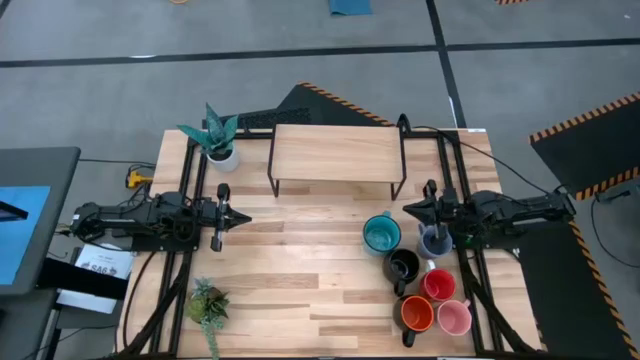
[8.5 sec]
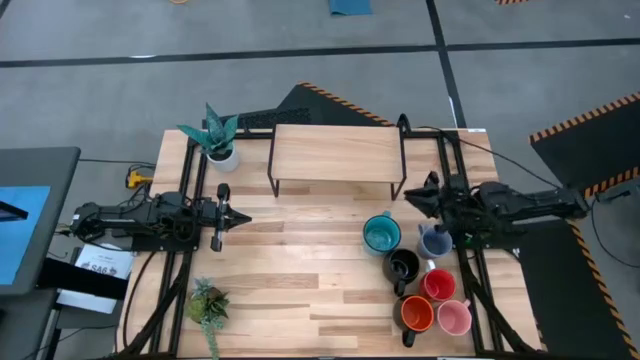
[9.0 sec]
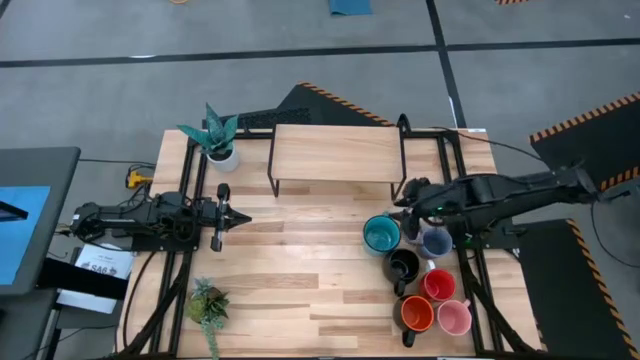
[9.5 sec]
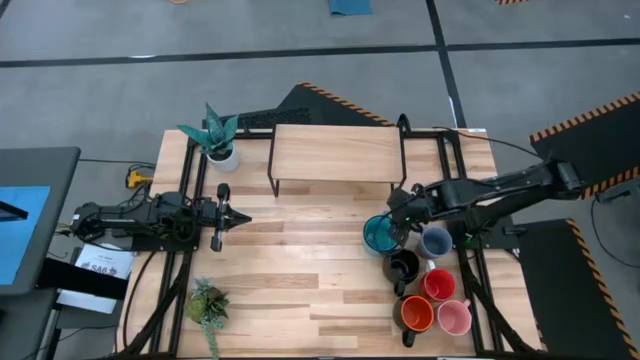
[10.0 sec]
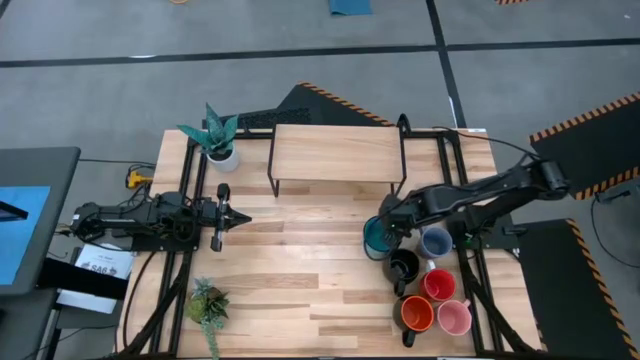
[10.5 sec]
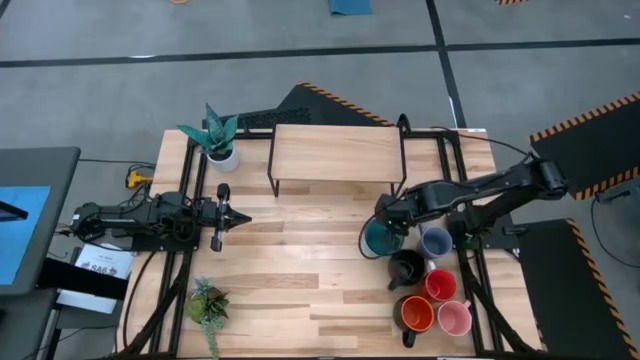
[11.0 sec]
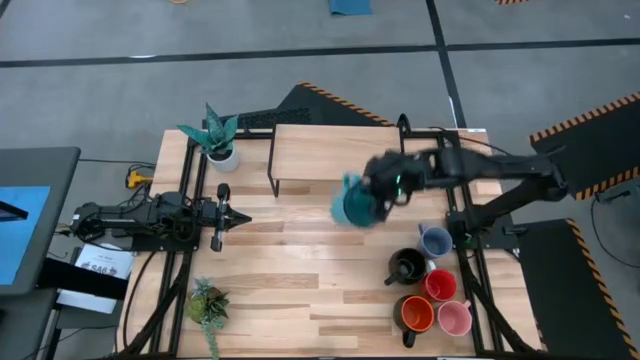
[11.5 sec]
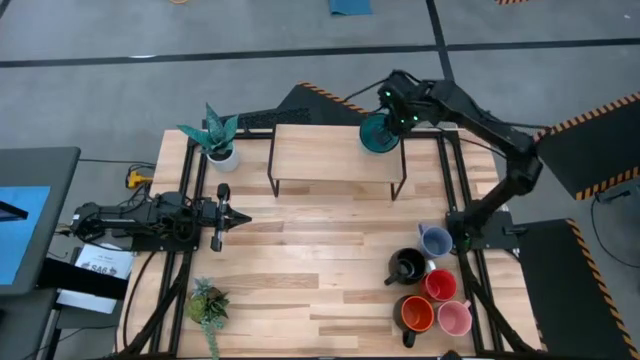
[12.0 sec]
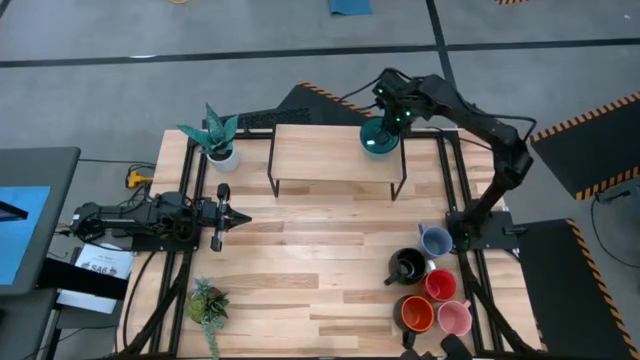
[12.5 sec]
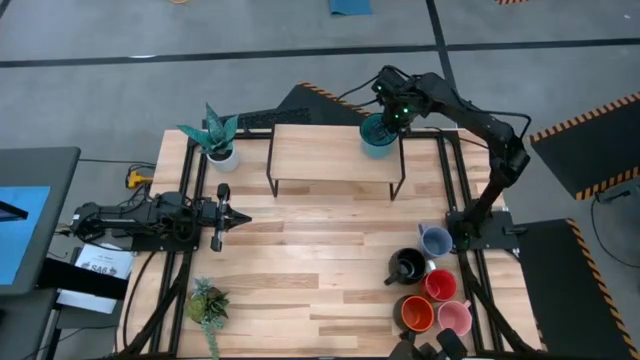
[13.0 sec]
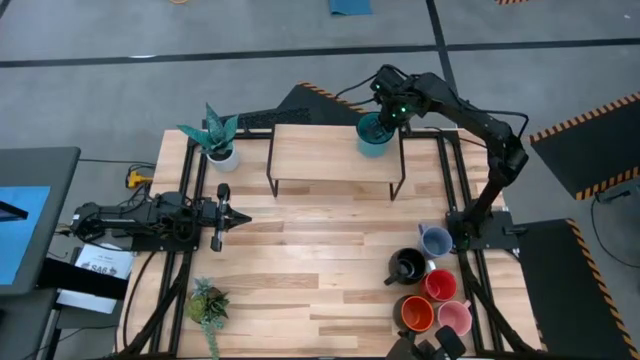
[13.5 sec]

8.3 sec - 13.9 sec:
Task: Place coffee mugs
Put the green mug on the shelf

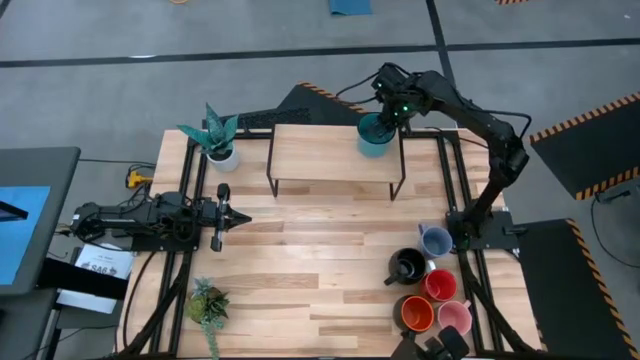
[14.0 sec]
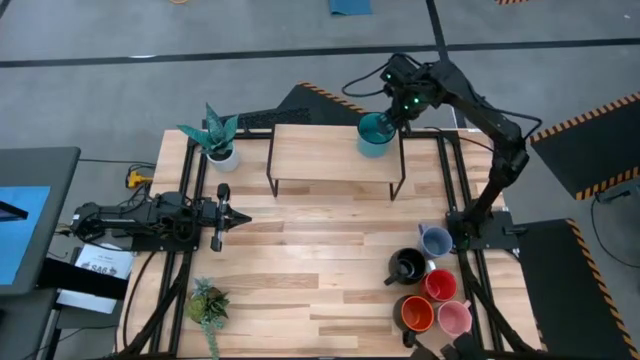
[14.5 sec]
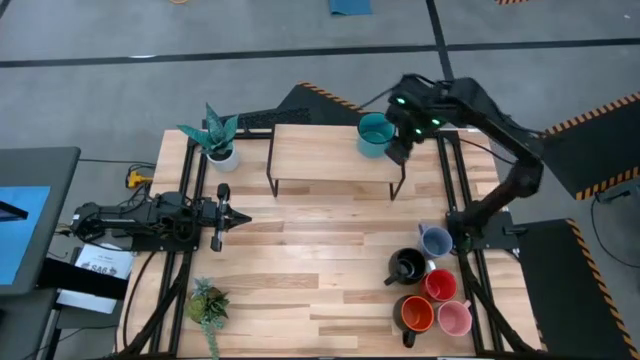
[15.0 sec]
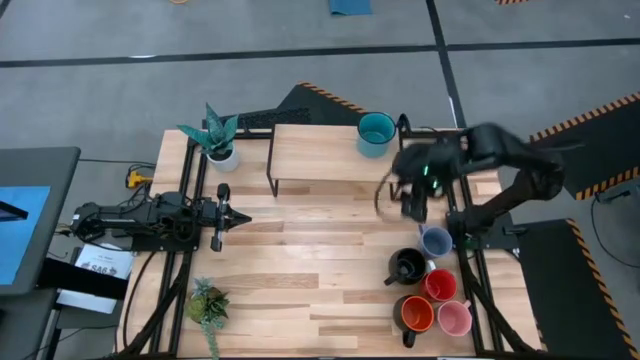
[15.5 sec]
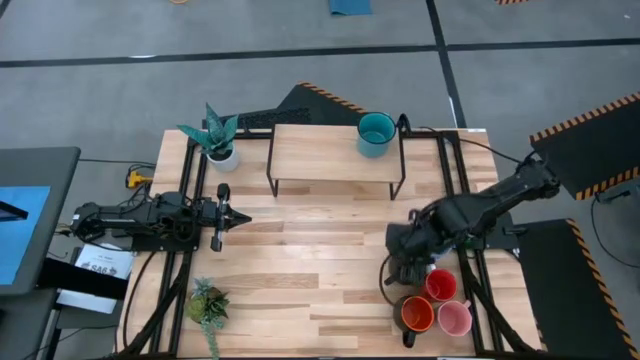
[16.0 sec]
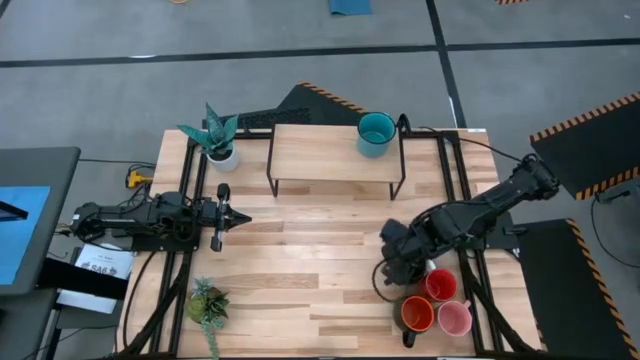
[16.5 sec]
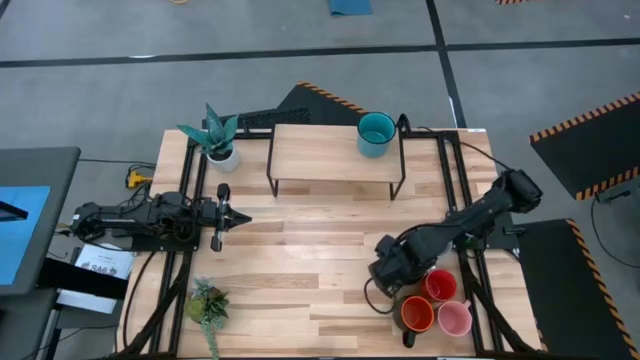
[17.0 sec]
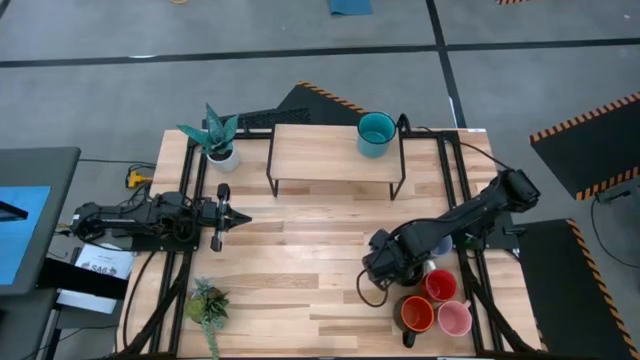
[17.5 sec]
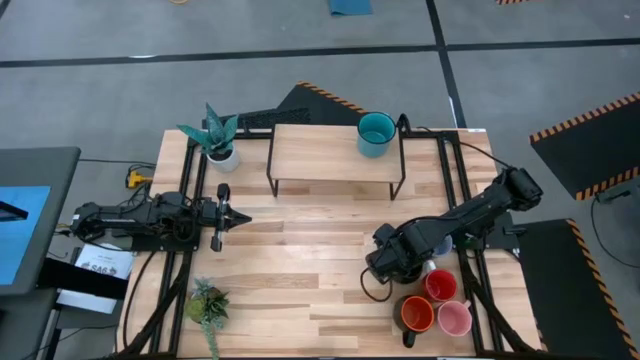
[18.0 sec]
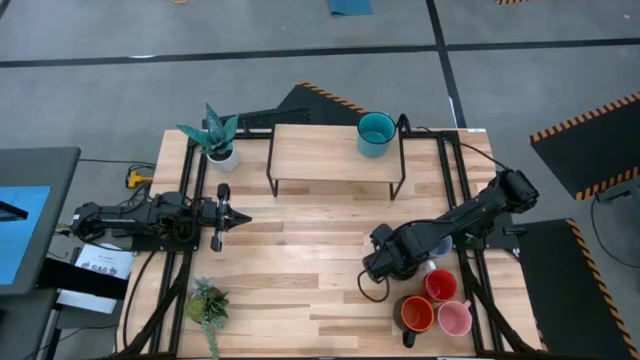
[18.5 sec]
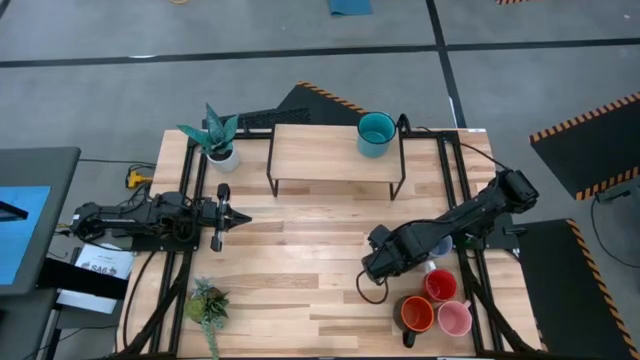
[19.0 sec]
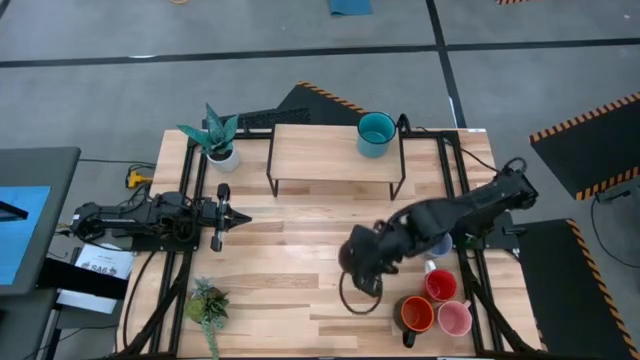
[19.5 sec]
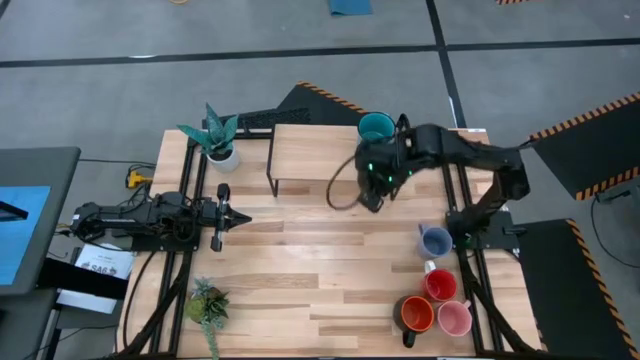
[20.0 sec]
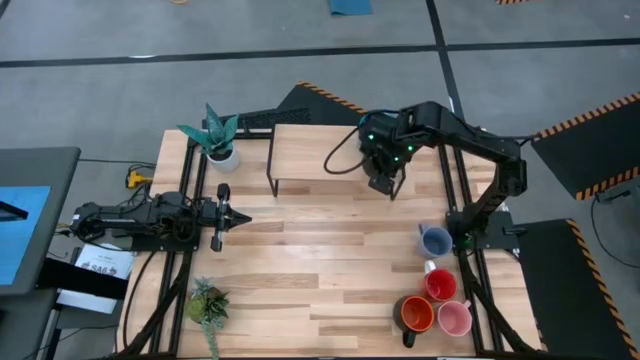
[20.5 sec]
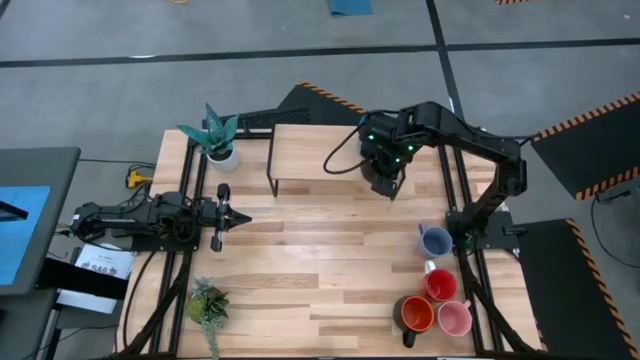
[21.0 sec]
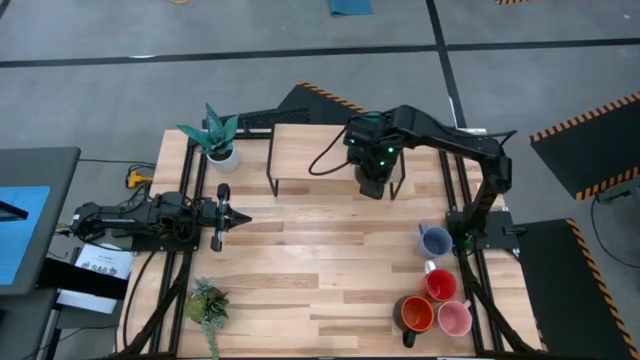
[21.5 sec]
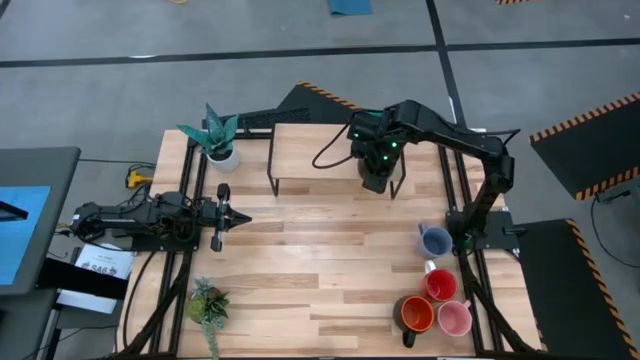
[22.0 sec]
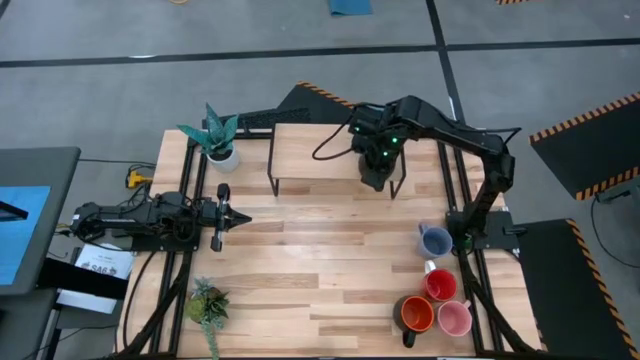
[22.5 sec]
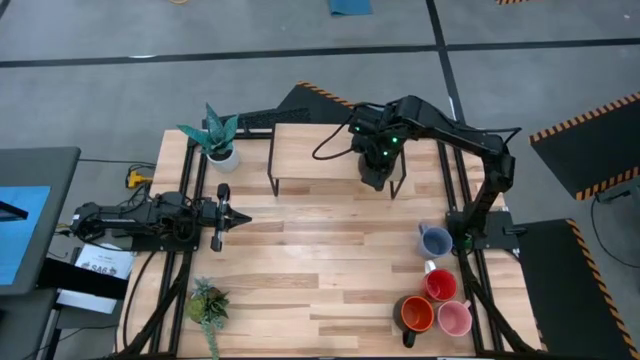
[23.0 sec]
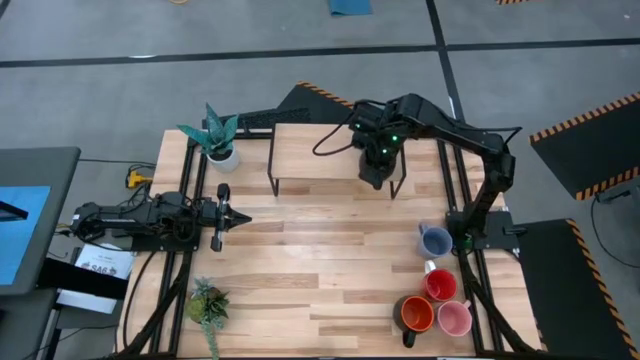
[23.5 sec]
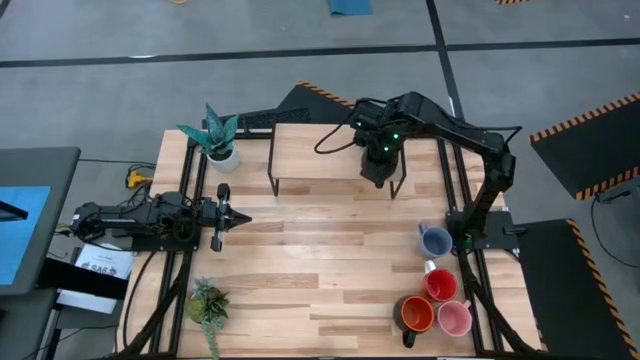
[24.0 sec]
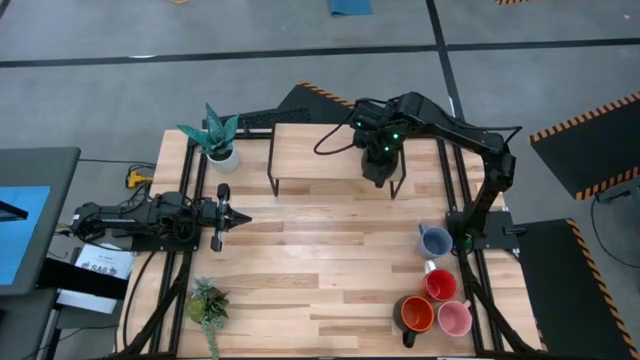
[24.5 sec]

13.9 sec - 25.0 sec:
Put the black mug on the shelf

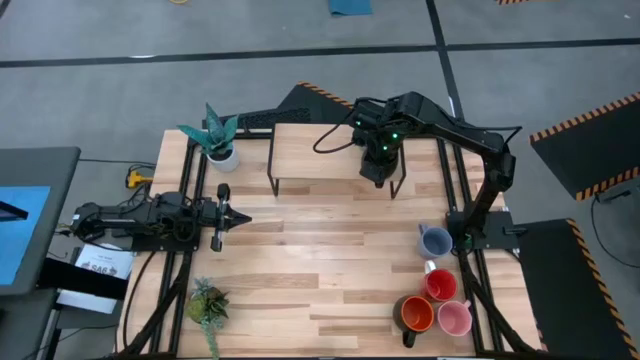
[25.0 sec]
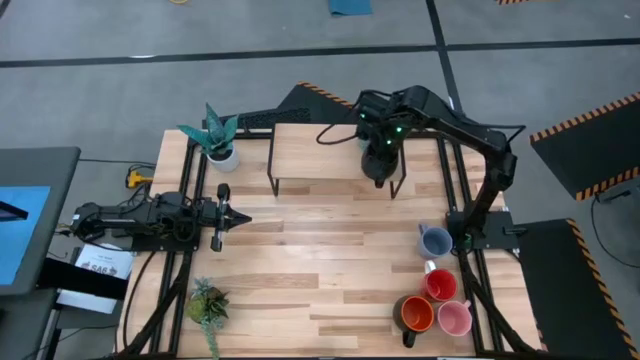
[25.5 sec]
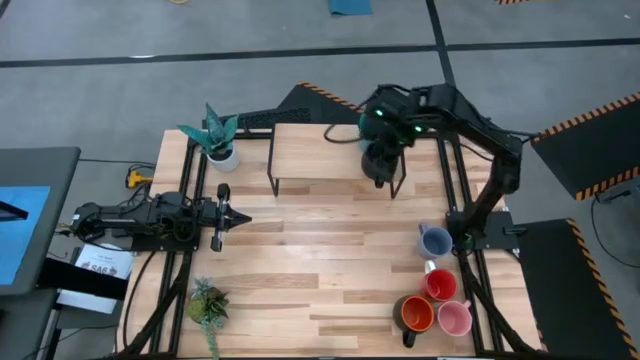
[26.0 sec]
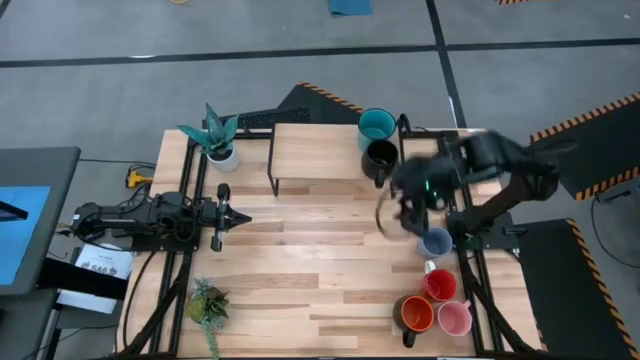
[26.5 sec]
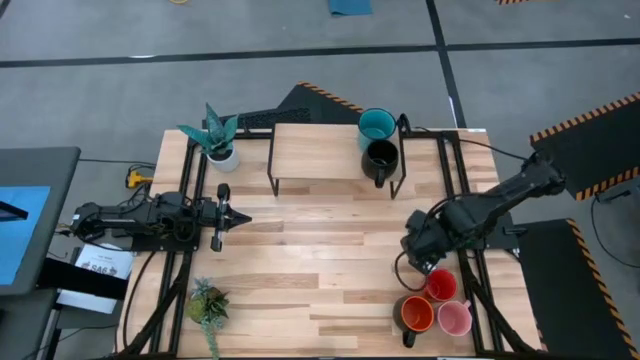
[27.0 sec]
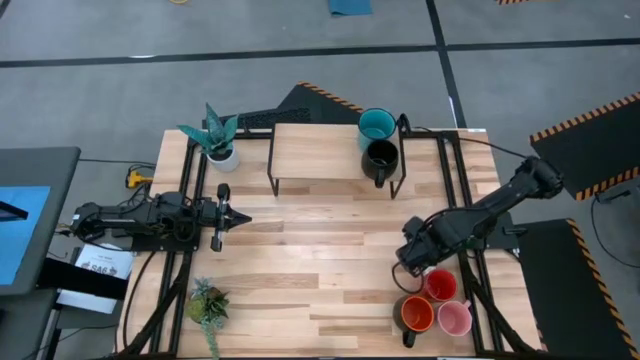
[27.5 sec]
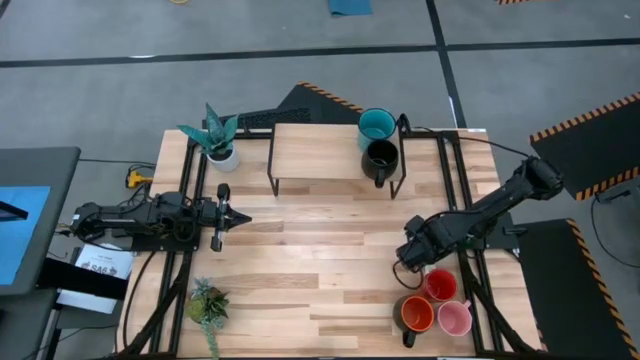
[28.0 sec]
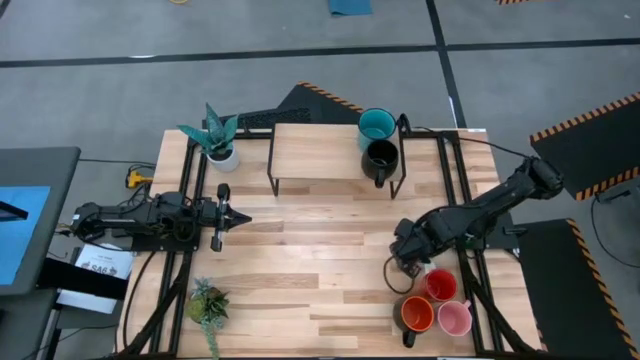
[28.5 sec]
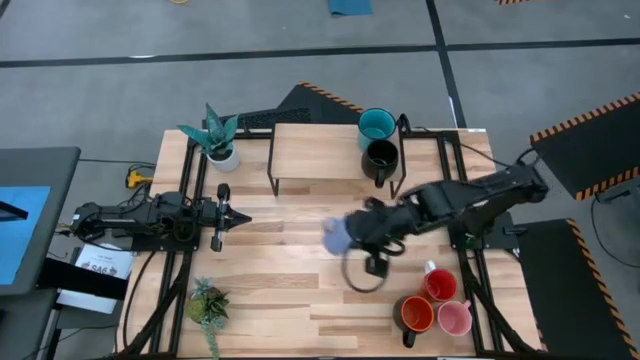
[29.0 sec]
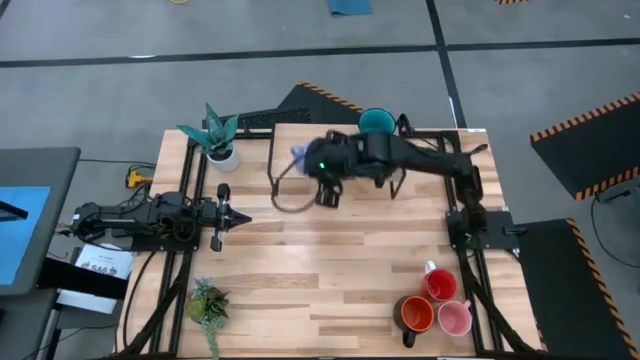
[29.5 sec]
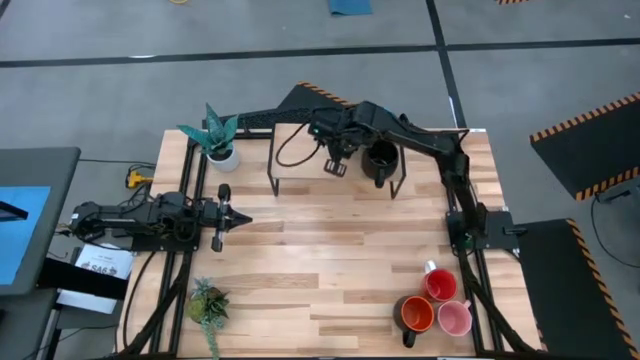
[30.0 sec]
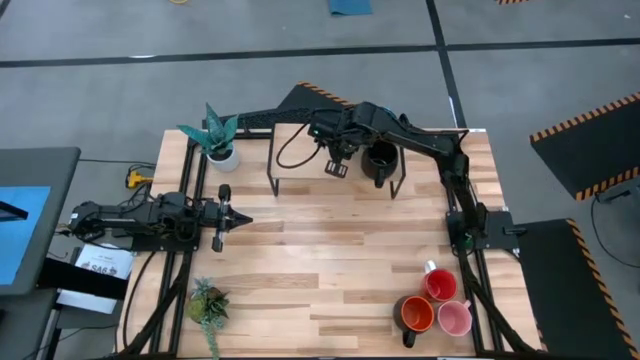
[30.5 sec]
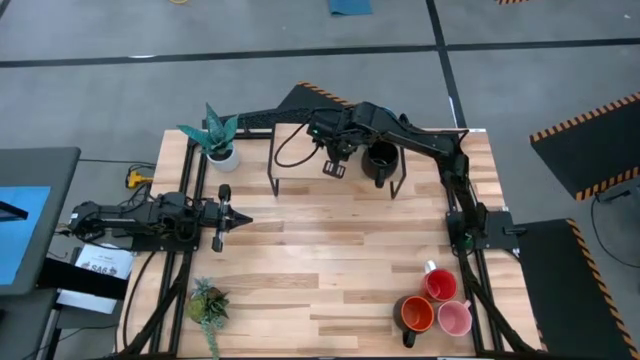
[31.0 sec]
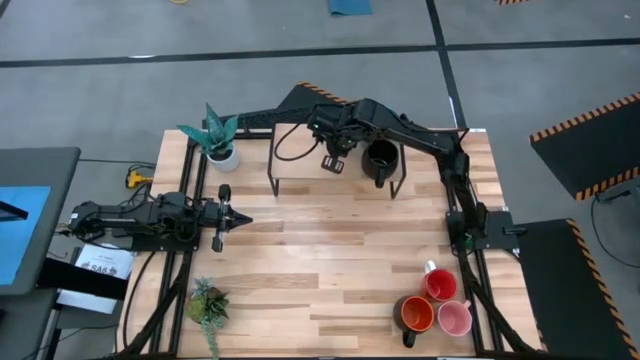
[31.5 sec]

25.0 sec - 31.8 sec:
Put the blue mug on the shelf
